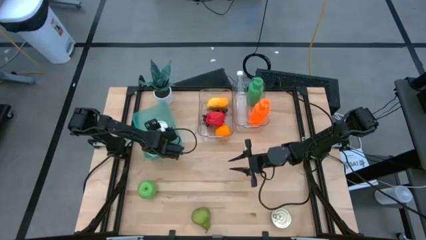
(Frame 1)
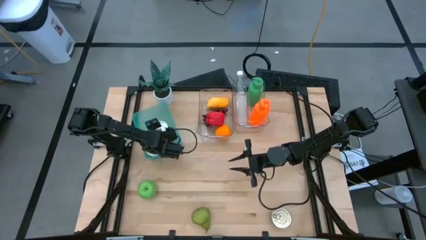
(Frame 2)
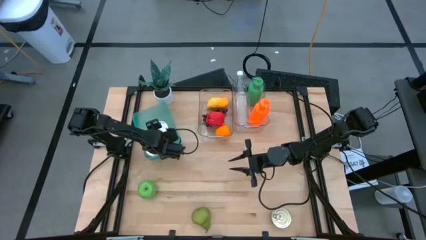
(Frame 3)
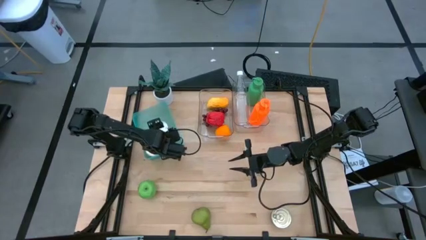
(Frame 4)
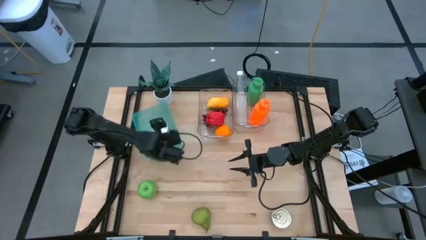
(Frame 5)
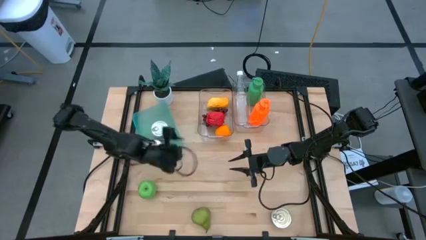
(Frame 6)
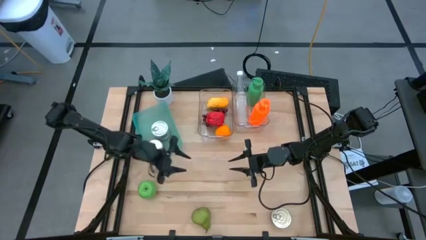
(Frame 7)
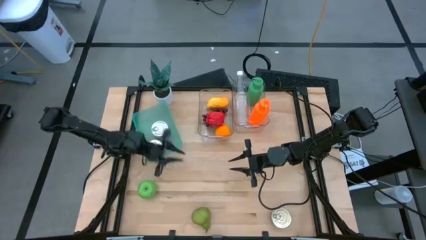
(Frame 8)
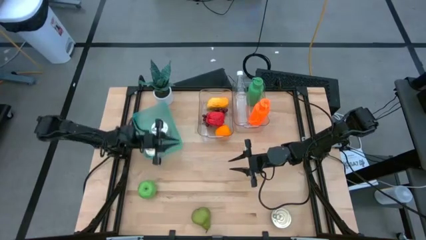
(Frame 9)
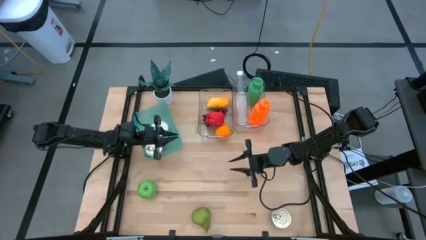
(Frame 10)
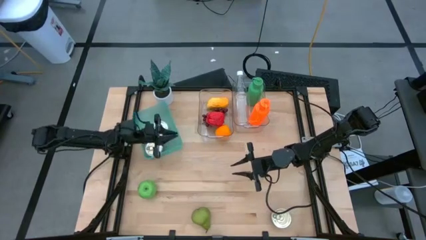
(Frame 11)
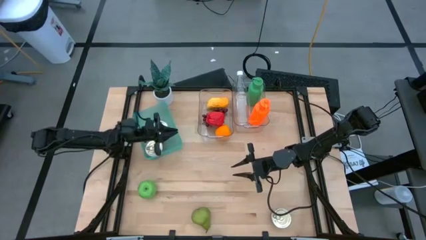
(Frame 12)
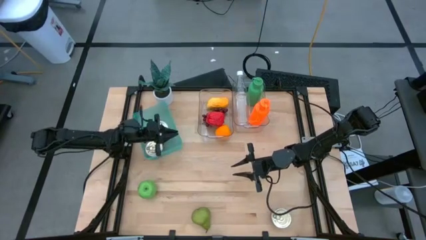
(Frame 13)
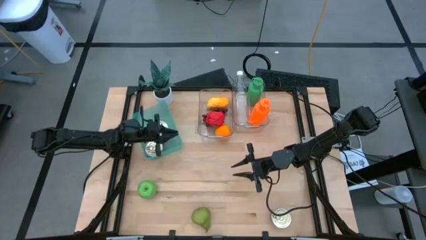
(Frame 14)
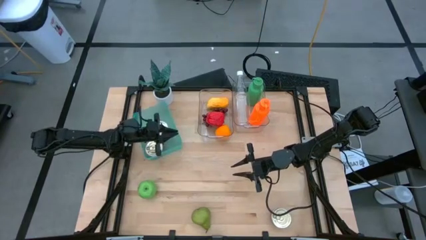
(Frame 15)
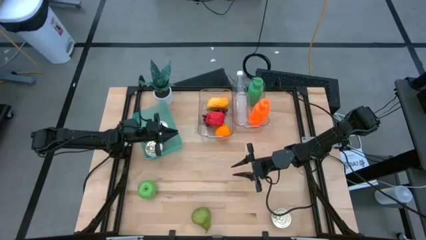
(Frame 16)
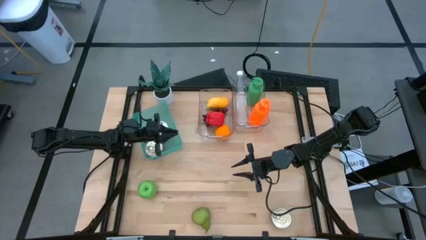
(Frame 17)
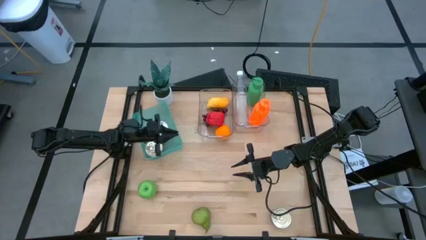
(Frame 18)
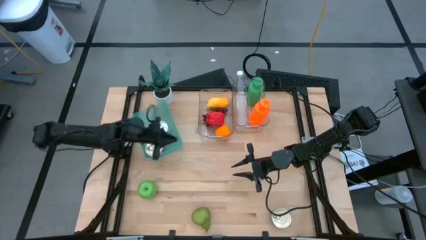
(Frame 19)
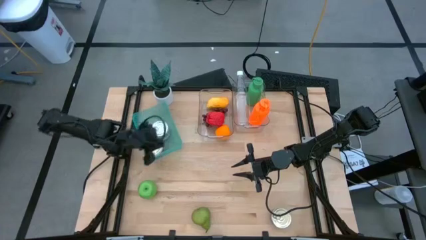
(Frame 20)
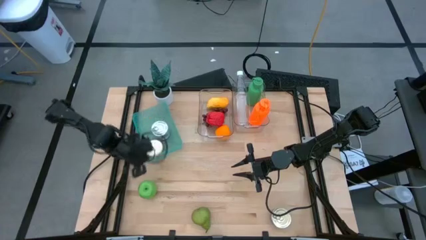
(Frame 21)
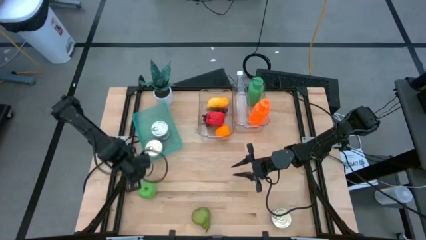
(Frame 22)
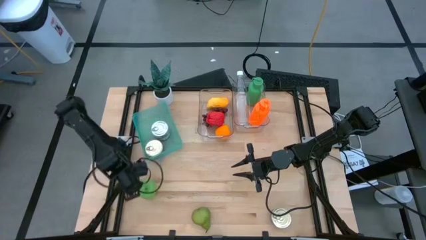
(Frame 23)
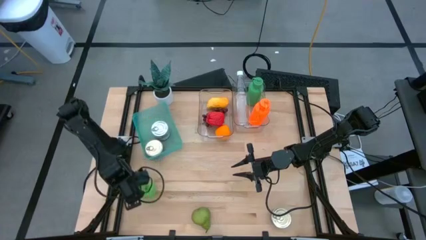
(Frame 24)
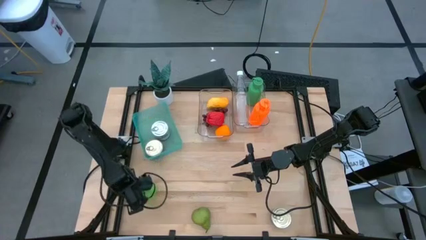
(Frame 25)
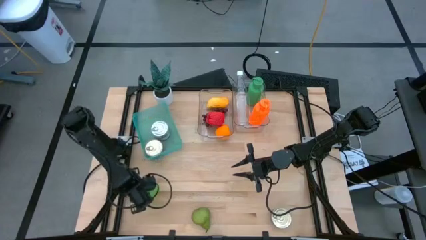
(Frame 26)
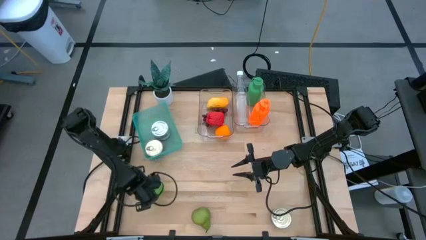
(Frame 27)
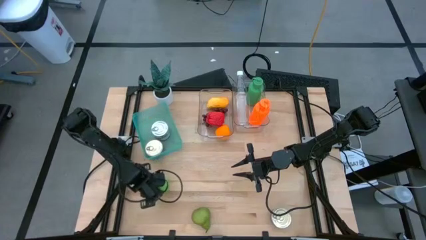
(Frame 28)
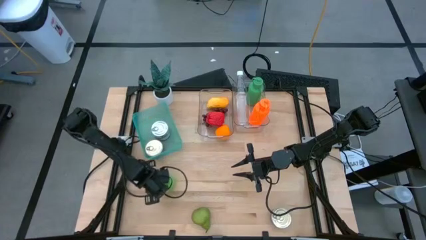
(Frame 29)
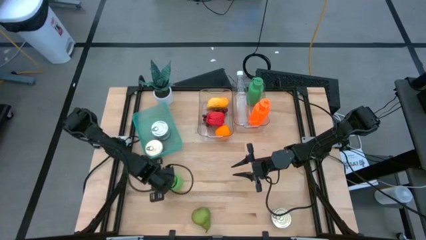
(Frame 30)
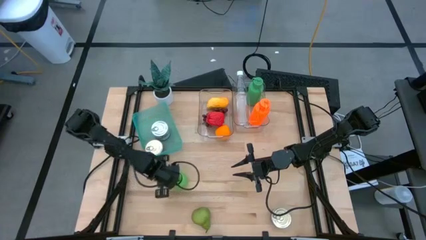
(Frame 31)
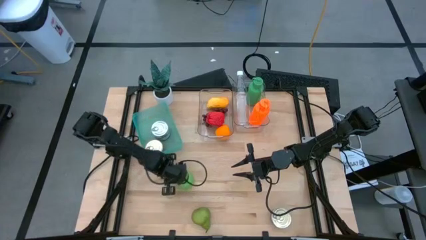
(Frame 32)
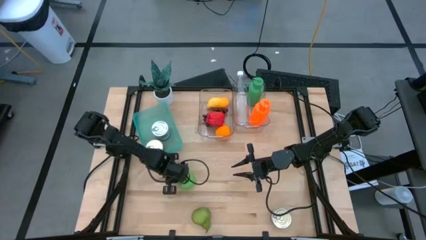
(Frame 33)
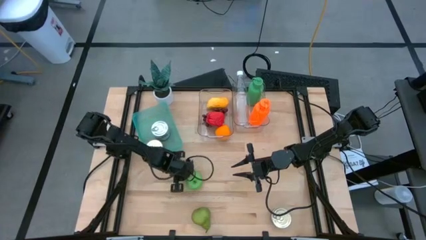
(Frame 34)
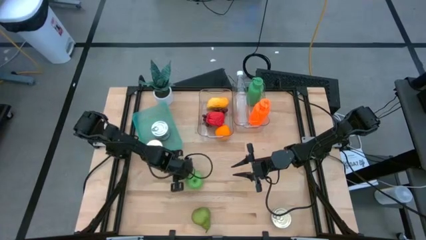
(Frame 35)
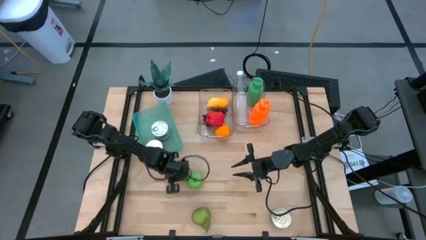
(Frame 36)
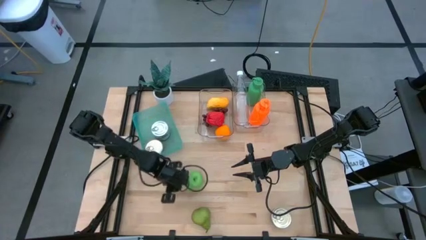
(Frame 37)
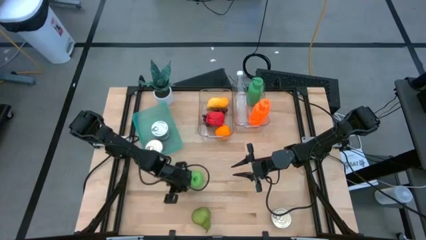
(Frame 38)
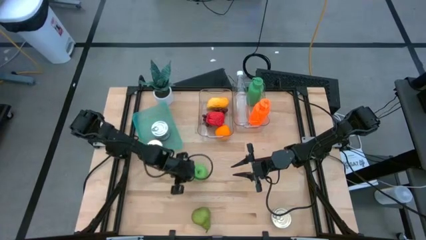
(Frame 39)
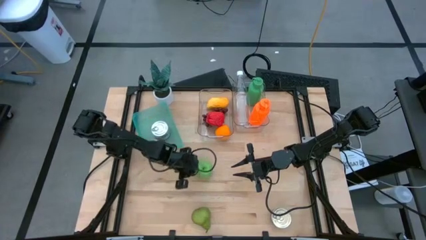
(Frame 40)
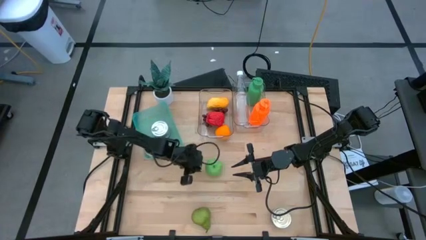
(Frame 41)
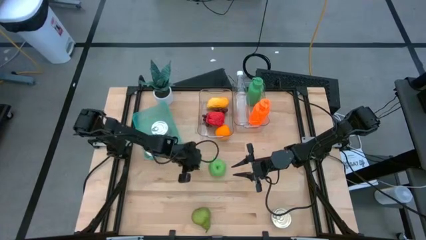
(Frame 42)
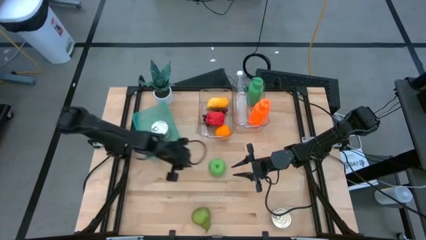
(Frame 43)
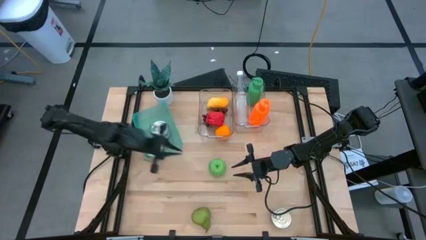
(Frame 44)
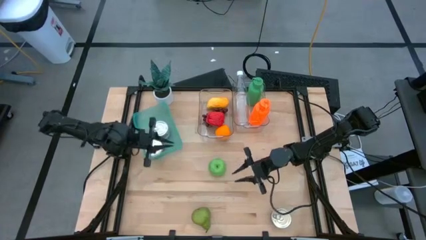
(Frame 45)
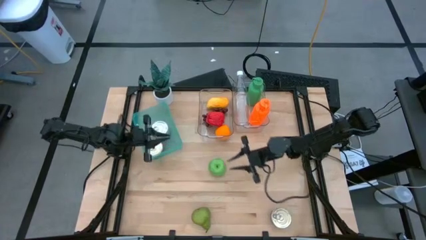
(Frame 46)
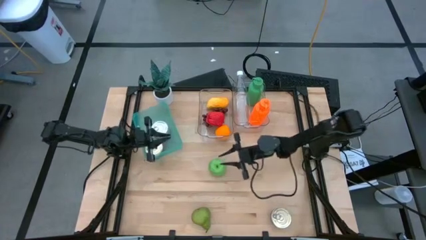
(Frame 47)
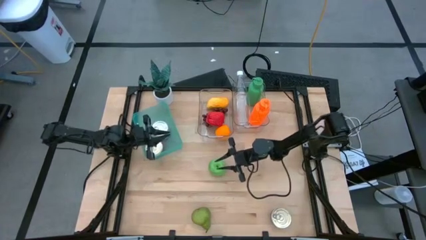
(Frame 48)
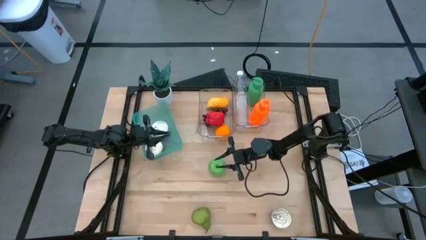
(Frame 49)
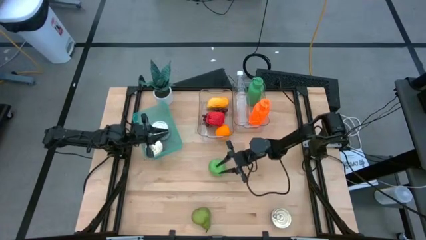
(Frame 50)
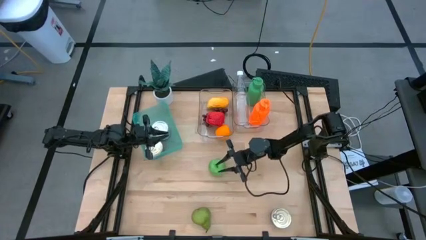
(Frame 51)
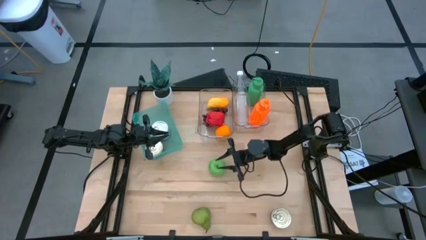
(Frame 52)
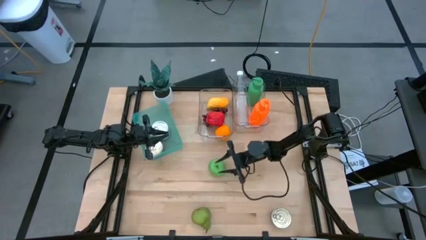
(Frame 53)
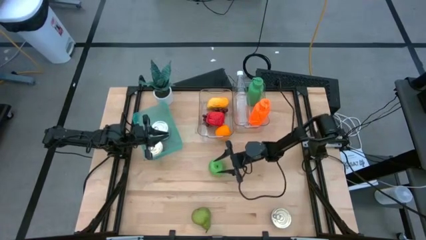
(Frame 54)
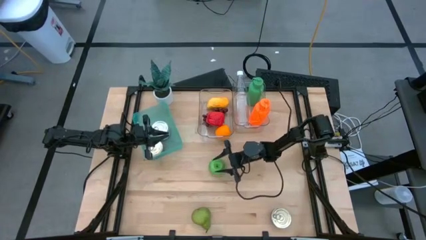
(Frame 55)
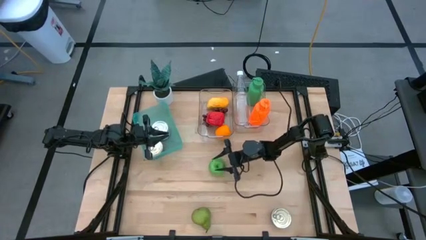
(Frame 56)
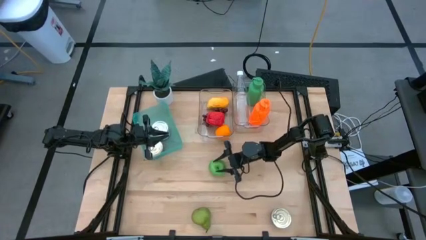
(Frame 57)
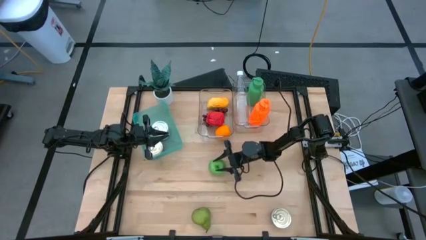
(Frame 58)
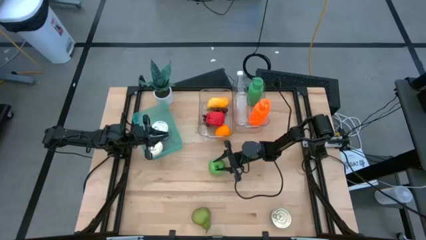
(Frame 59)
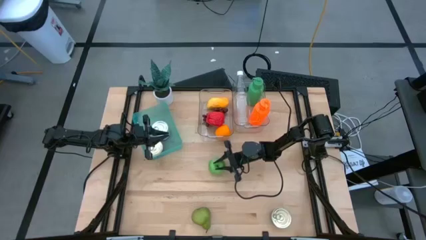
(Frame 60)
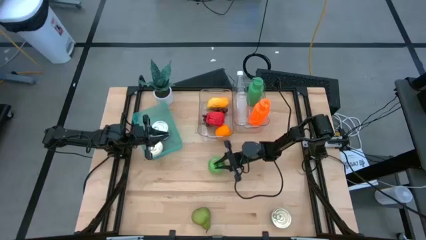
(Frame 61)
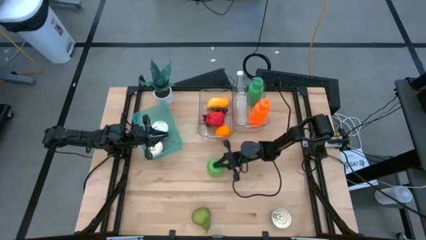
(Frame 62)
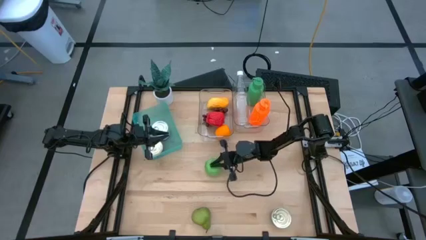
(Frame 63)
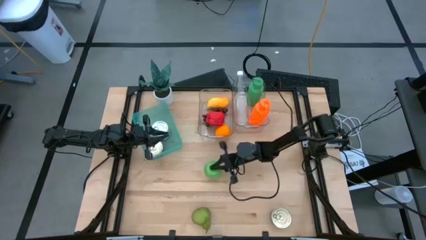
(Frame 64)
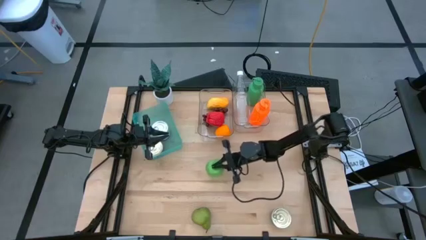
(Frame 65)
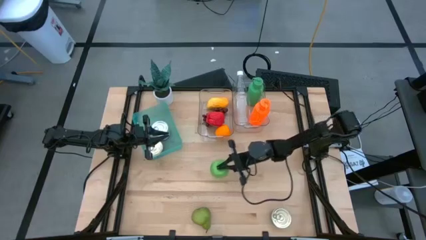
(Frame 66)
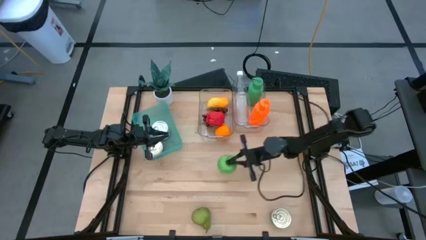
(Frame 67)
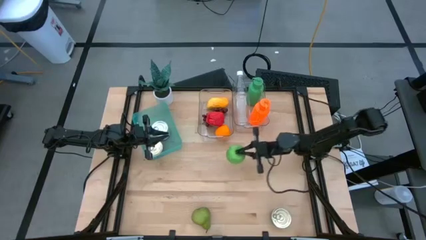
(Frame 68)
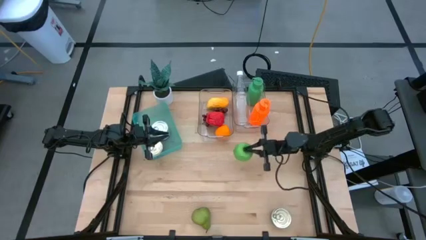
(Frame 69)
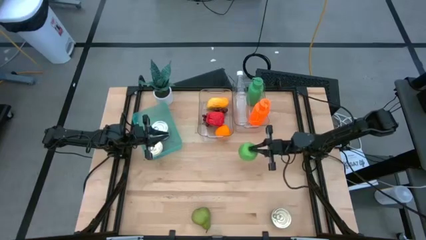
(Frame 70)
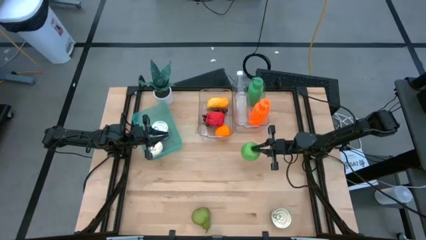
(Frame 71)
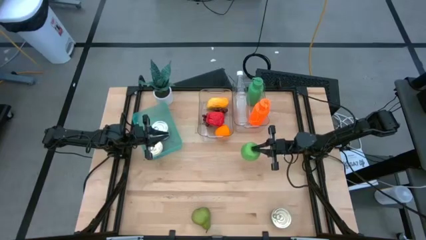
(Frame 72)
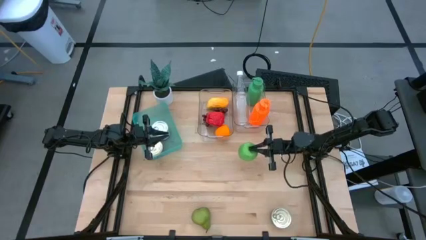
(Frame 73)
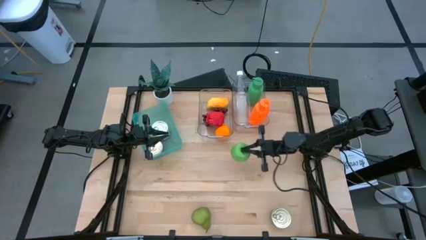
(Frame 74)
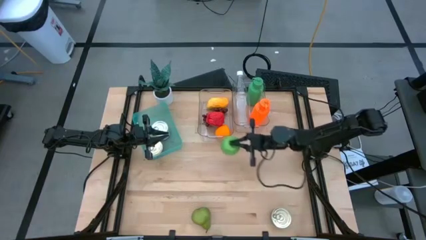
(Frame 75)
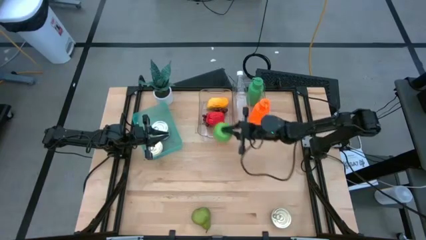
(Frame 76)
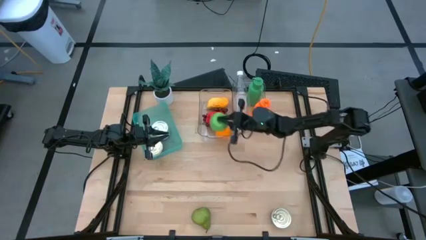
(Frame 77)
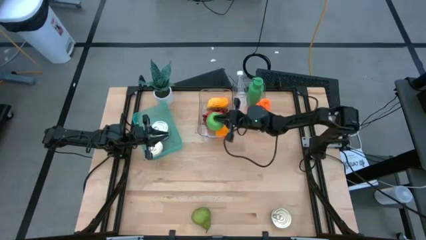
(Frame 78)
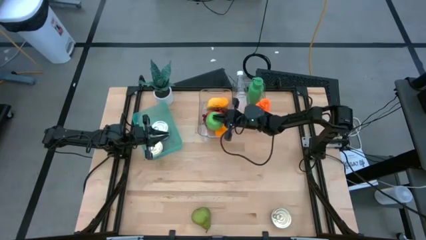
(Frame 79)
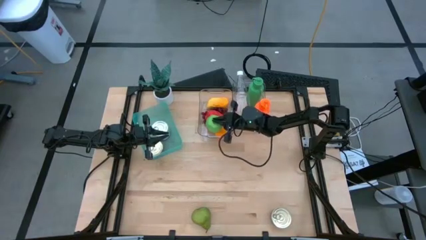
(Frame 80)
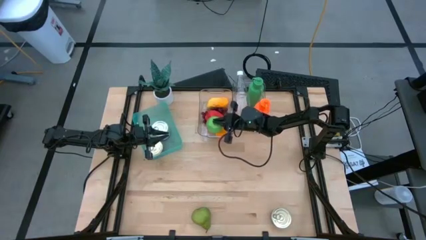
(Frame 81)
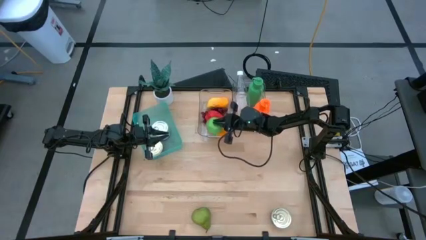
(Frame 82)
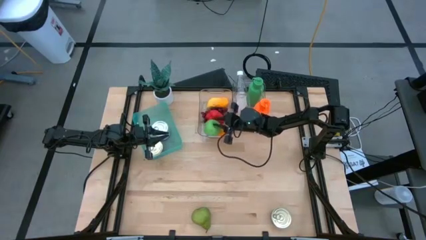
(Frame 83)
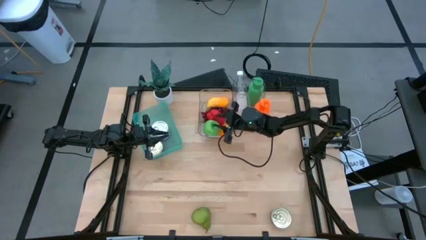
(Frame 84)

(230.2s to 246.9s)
Task: Pick & Place Food Item
Put the green apple into the left transparent bin
